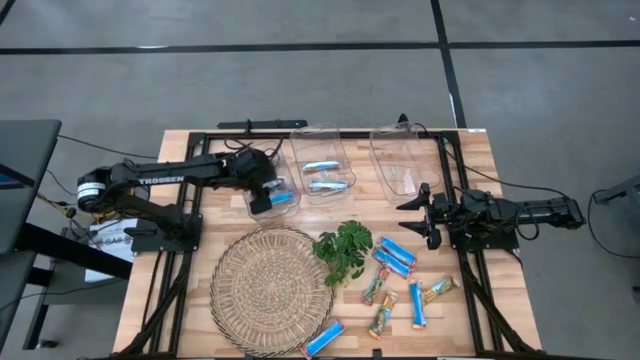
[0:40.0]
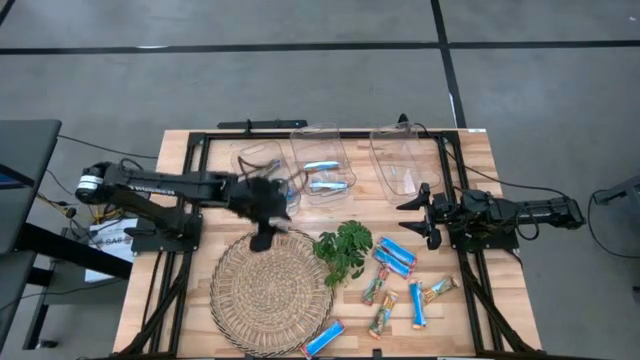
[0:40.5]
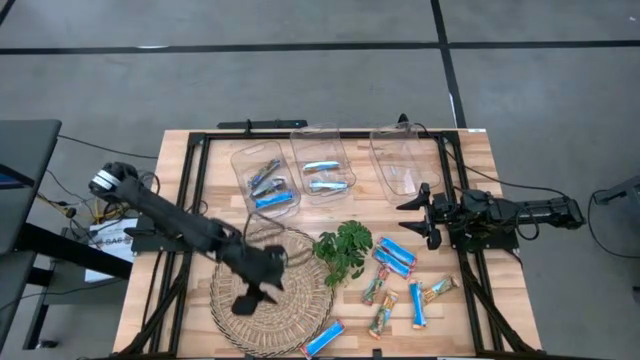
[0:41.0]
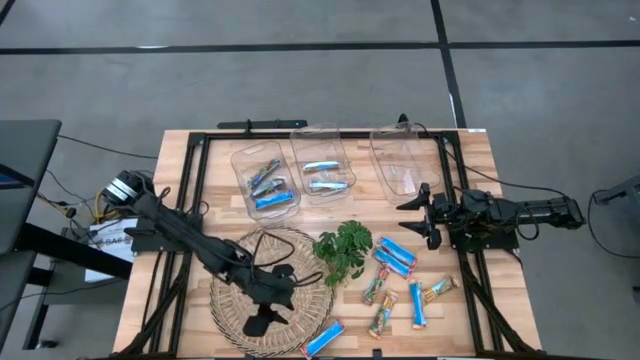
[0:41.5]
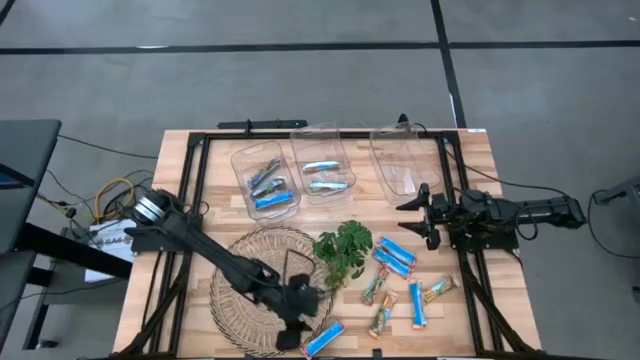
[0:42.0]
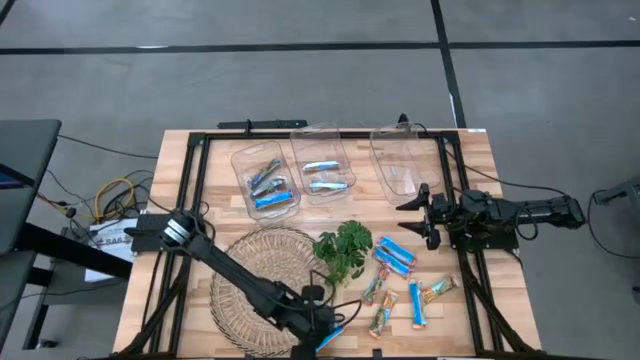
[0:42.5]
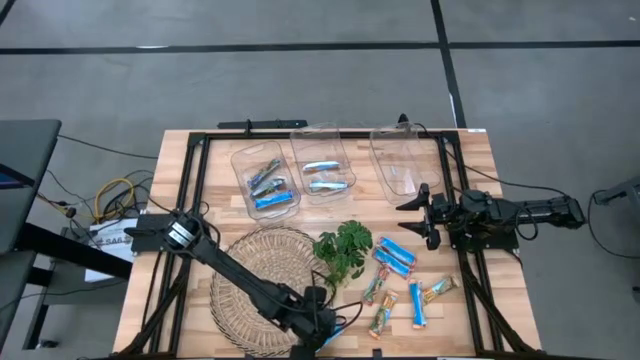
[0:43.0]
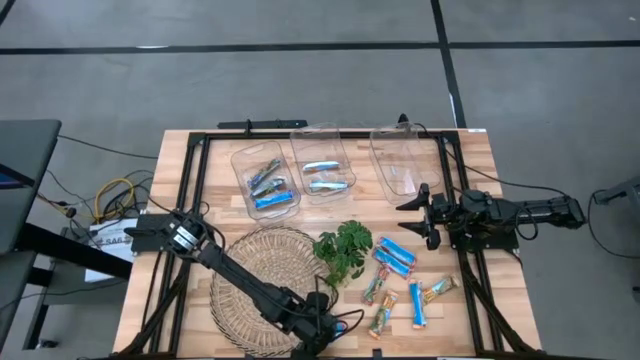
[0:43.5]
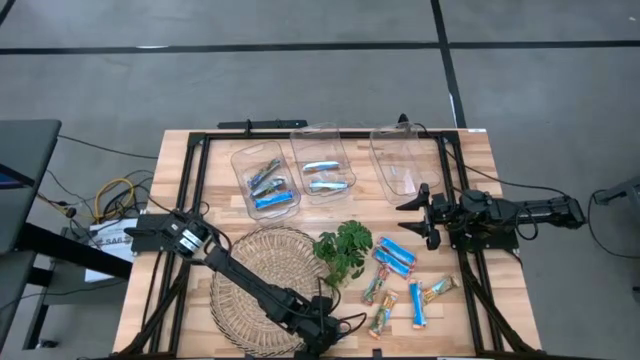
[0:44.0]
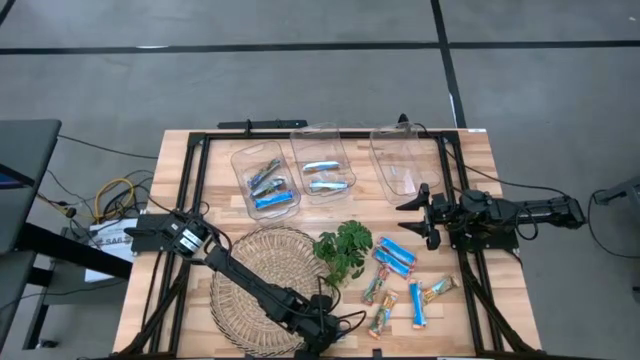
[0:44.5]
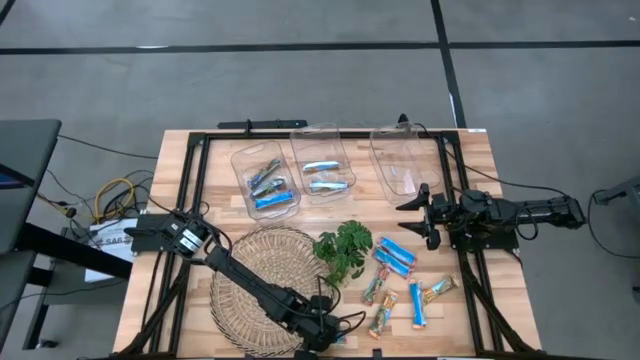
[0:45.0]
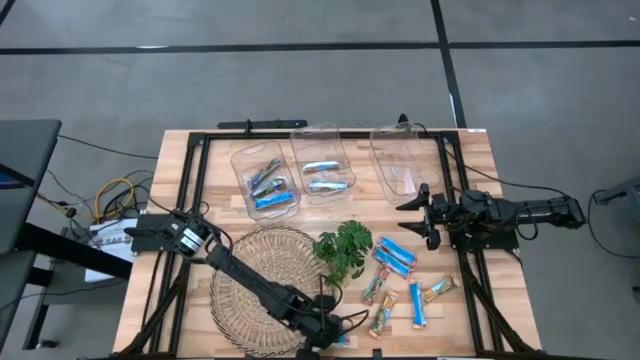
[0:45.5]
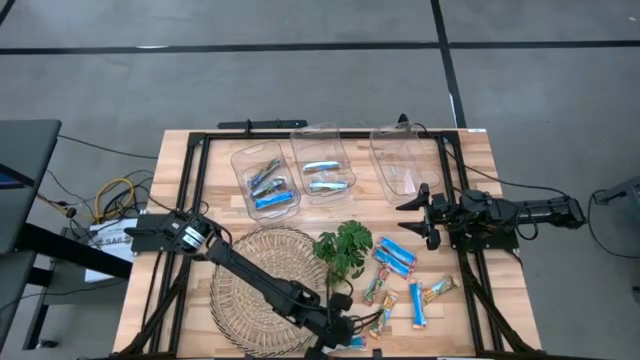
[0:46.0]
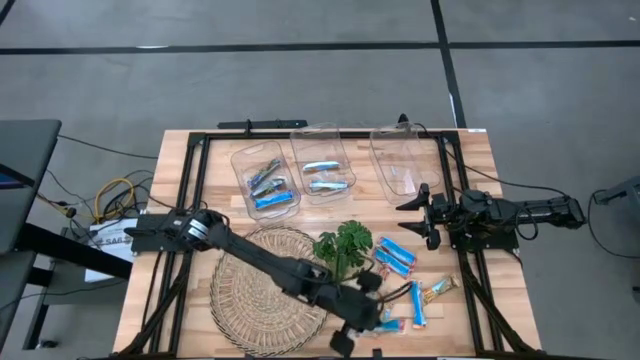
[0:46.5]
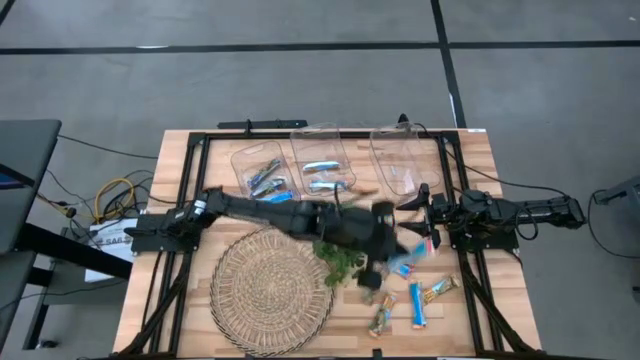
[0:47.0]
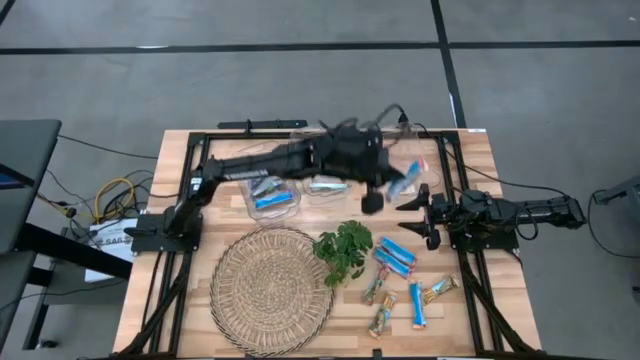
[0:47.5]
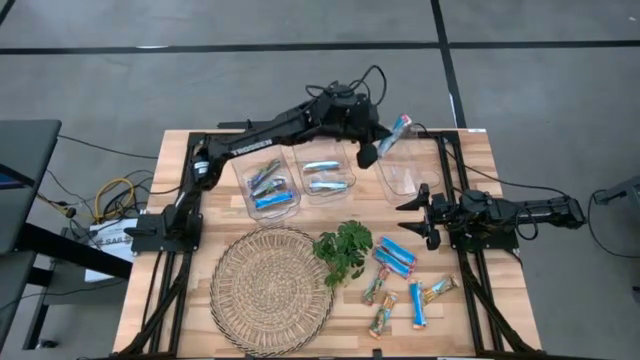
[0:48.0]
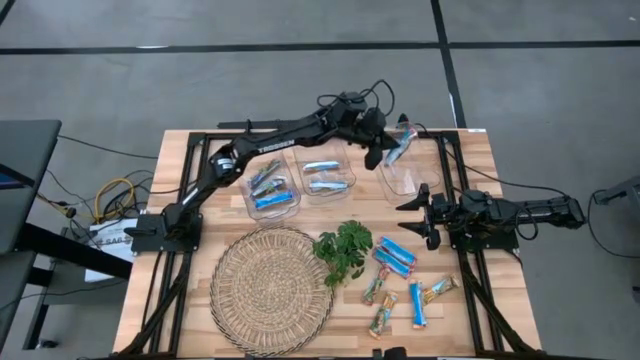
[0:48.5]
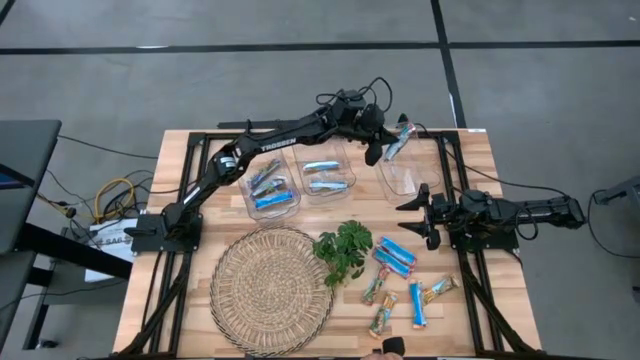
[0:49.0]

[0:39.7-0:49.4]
Task: Pick and place Granola Bars by type
Put the red granola bar into the right transparent bin

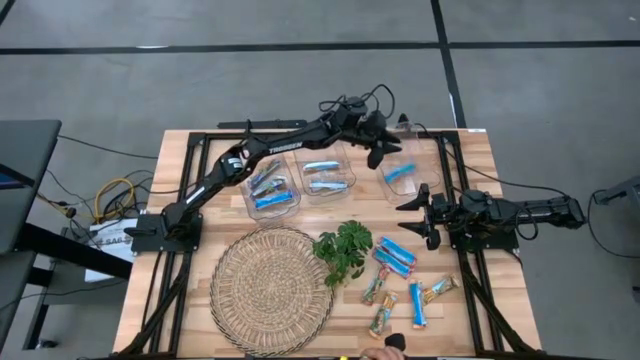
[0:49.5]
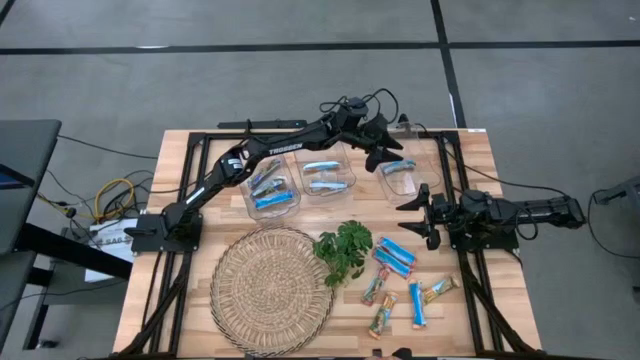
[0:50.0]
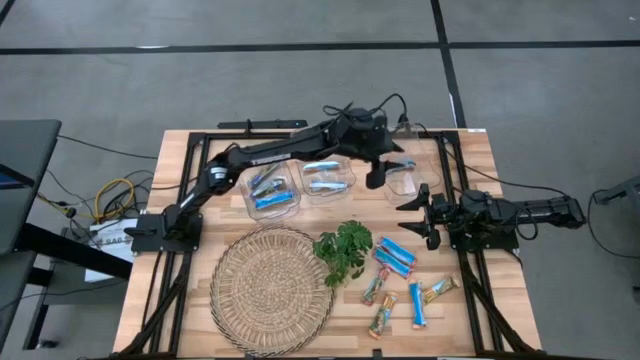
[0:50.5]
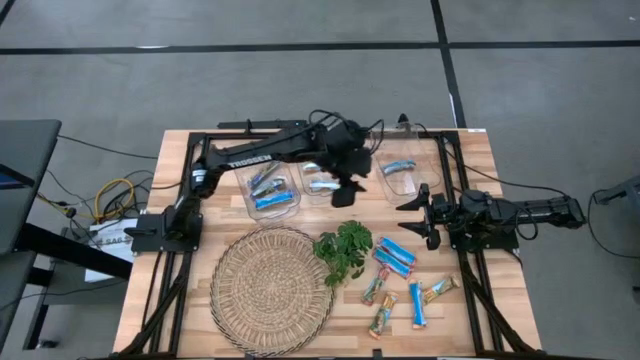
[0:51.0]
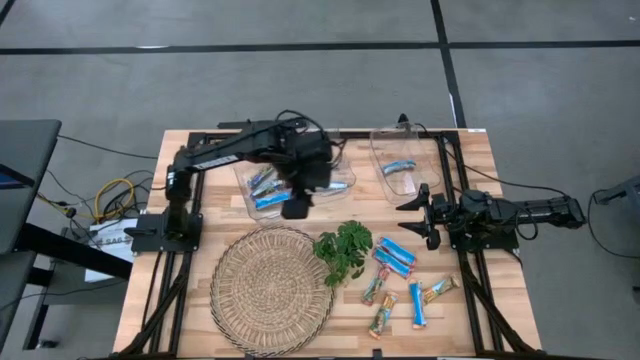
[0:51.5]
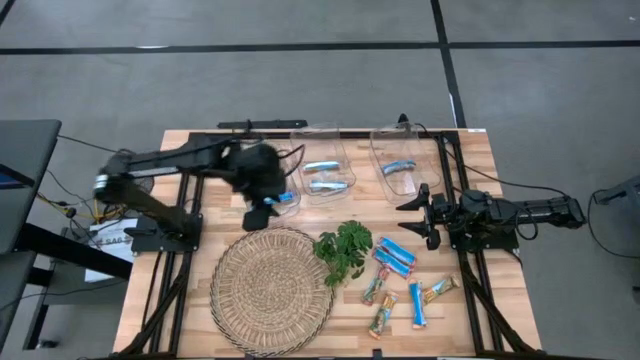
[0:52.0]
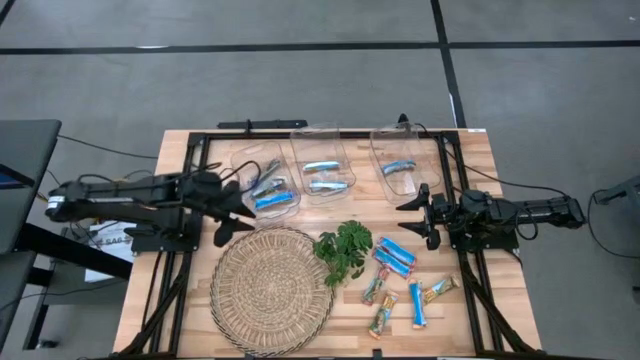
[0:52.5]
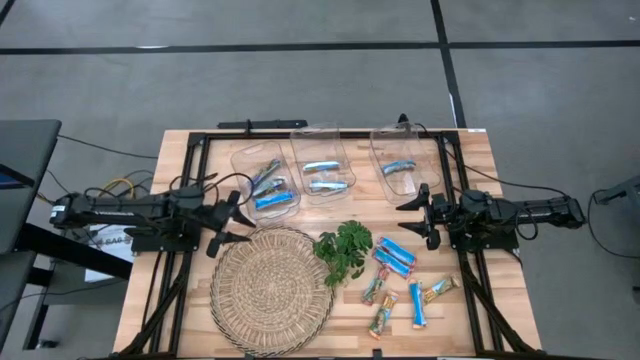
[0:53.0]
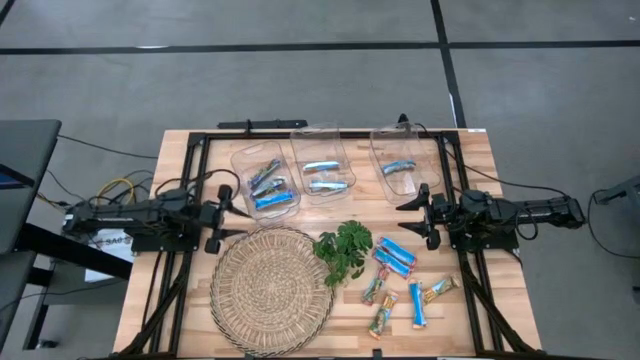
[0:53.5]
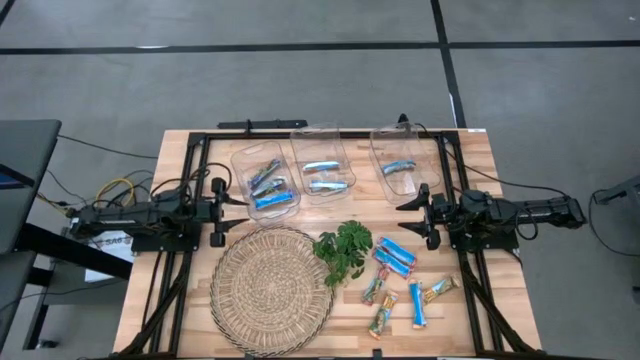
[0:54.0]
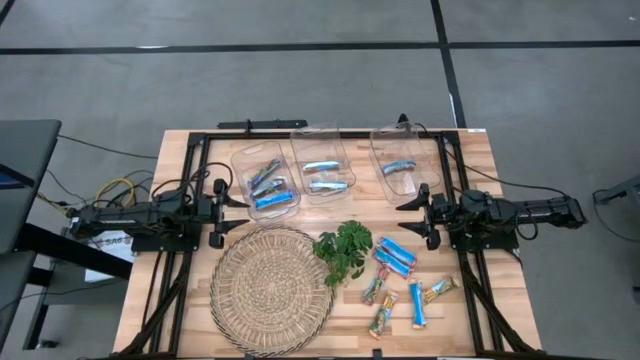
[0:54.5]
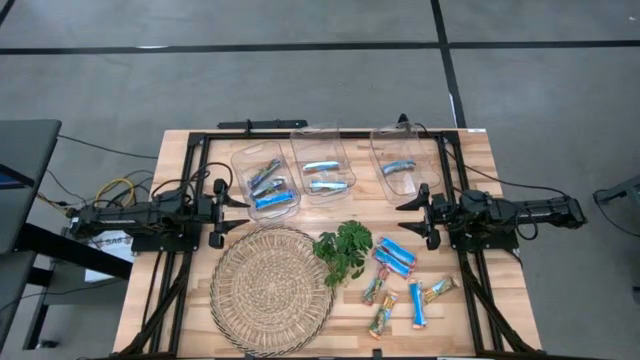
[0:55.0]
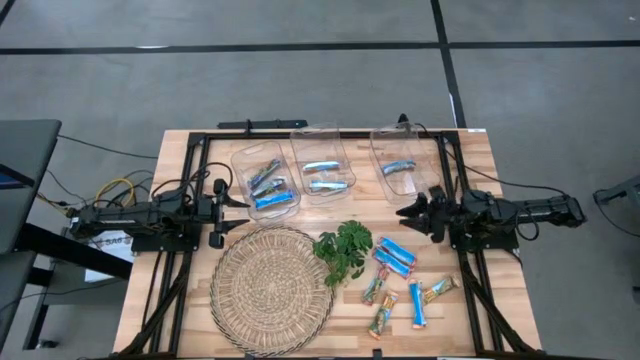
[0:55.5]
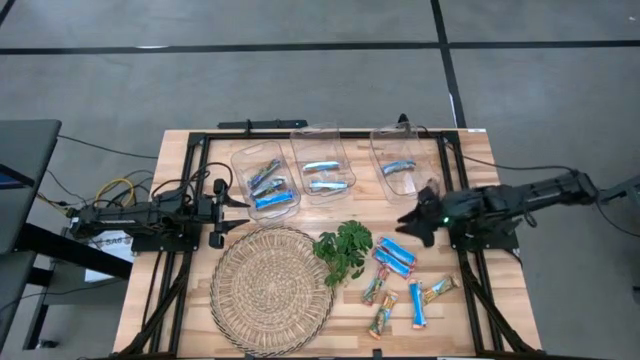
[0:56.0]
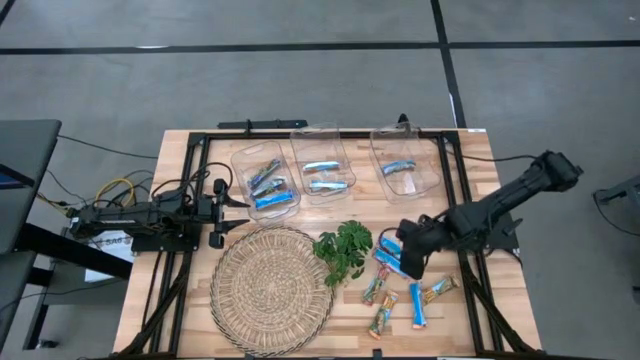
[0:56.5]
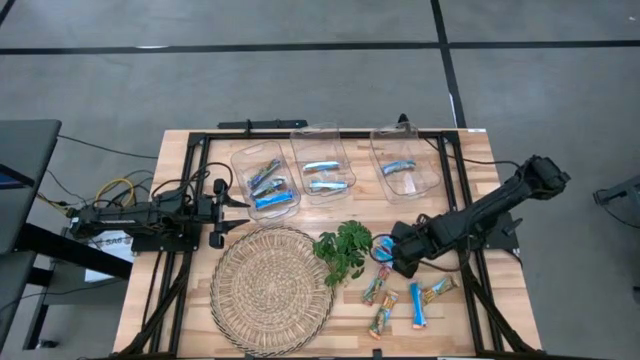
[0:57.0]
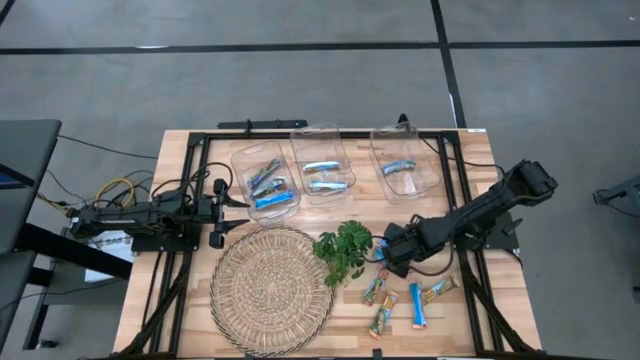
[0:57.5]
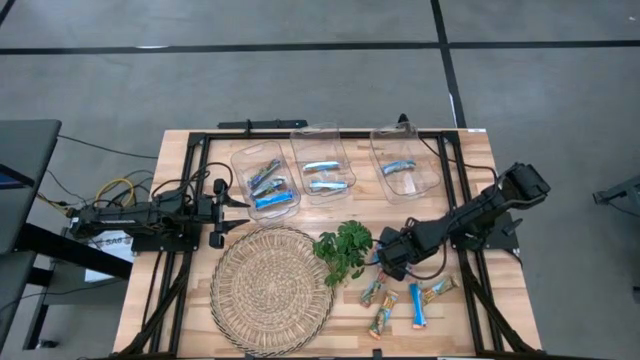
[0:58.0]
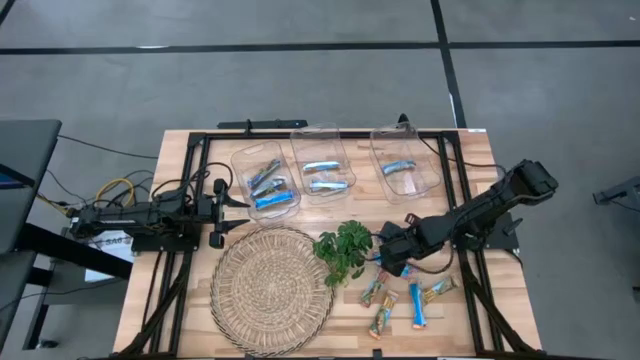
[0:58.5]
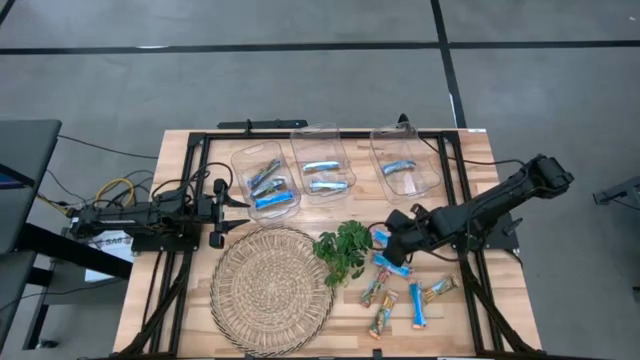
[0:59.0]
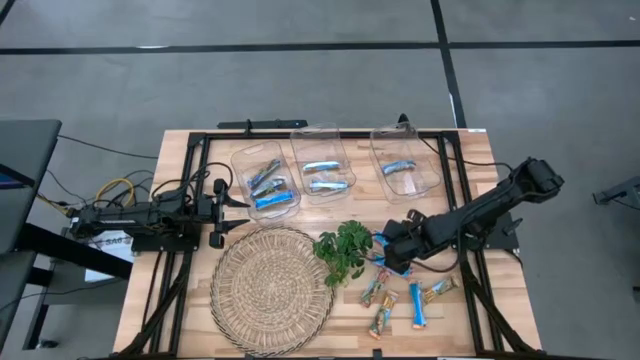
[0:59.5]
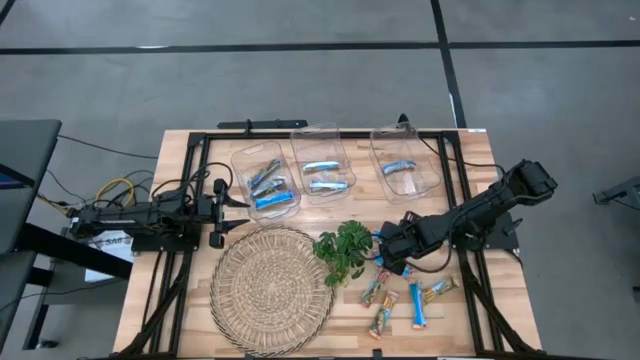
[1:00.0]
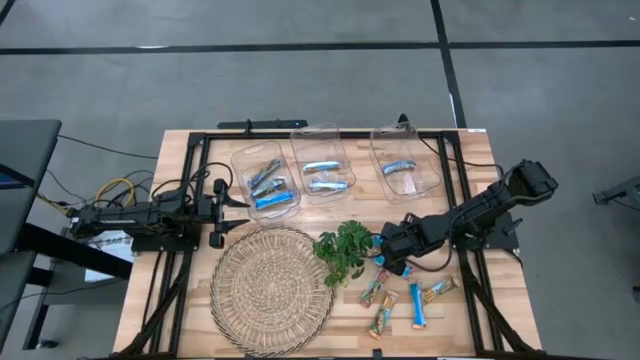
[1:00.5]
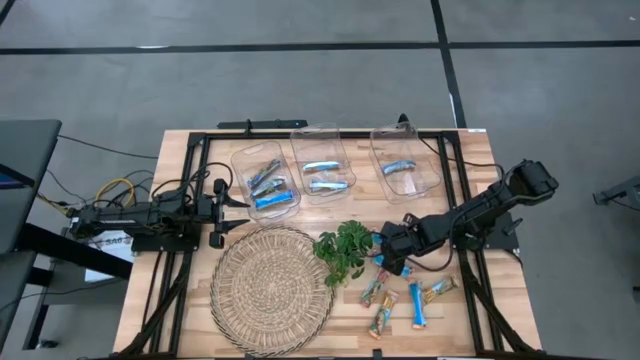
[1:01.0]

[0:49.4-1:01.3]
Put the red granola bar into the right transparent bin
